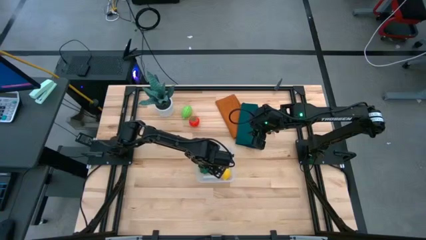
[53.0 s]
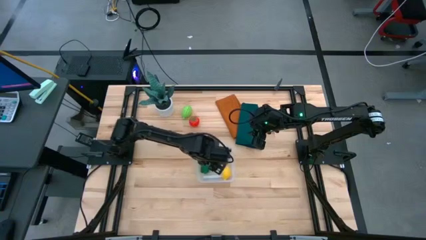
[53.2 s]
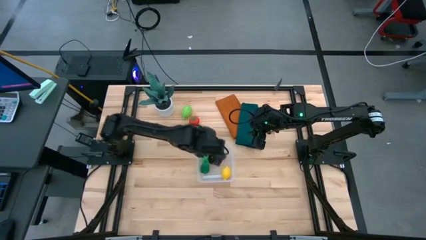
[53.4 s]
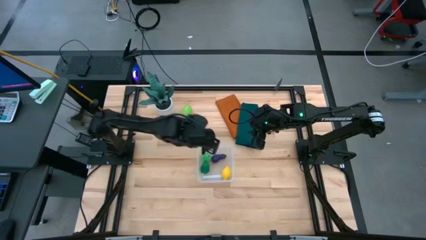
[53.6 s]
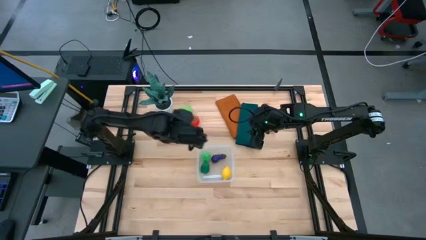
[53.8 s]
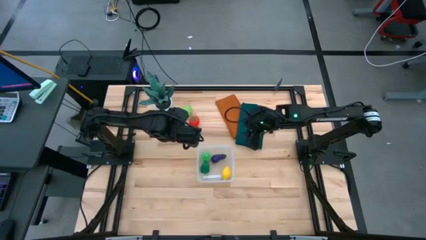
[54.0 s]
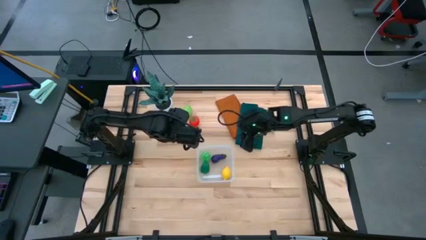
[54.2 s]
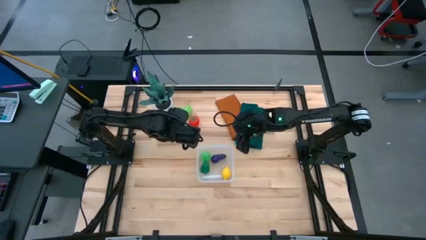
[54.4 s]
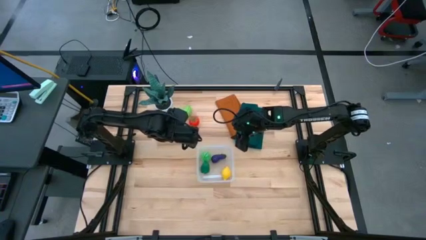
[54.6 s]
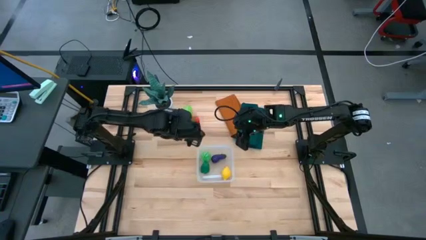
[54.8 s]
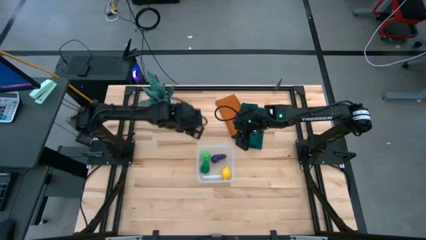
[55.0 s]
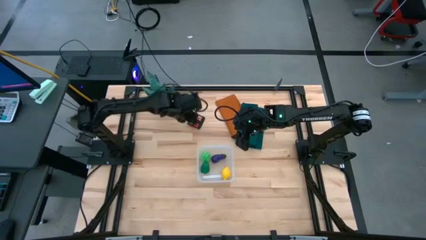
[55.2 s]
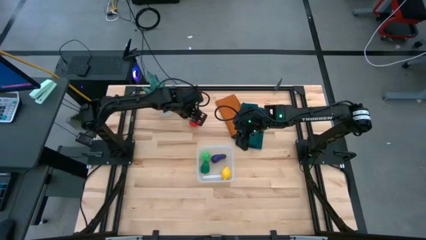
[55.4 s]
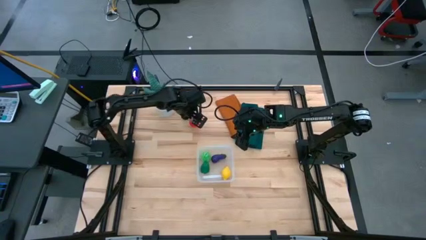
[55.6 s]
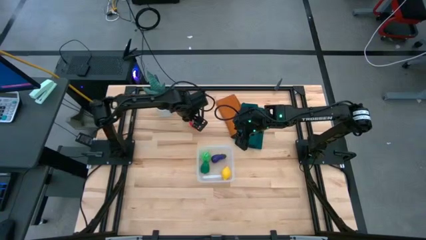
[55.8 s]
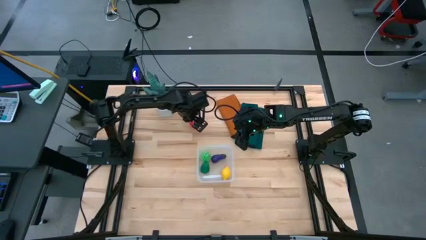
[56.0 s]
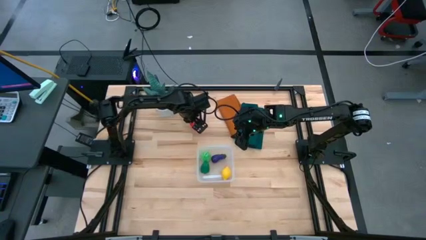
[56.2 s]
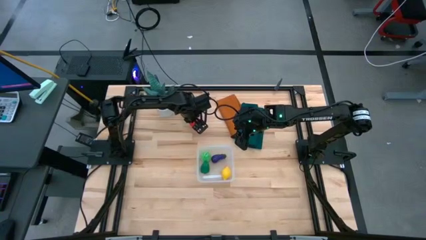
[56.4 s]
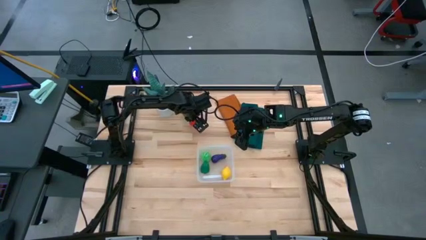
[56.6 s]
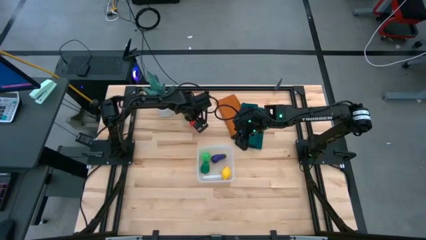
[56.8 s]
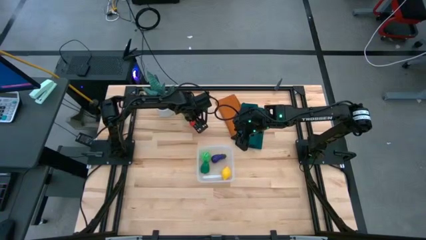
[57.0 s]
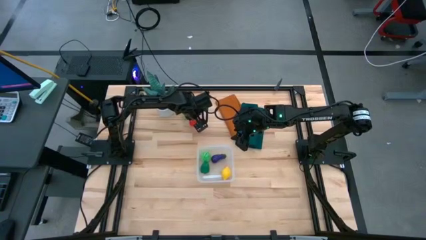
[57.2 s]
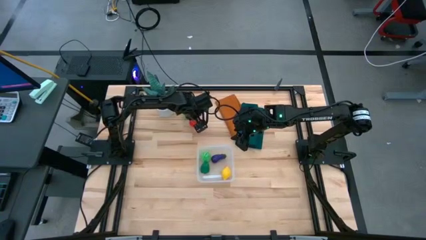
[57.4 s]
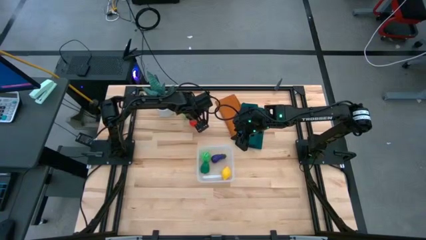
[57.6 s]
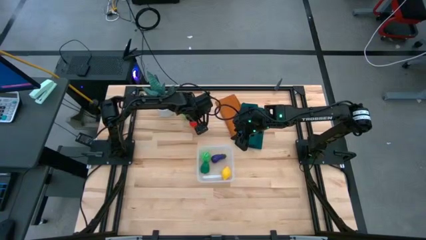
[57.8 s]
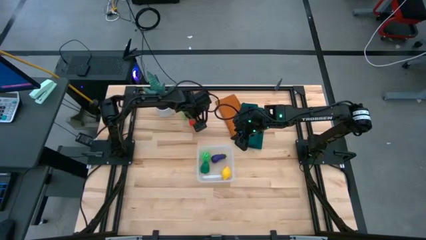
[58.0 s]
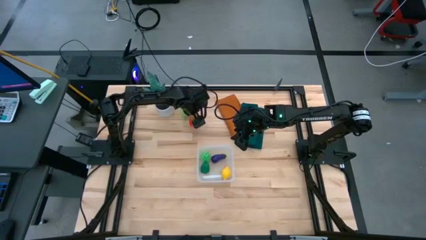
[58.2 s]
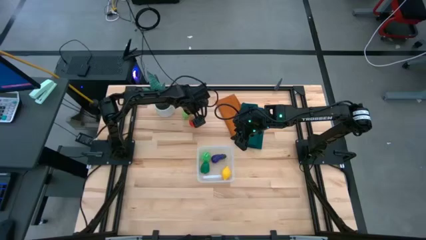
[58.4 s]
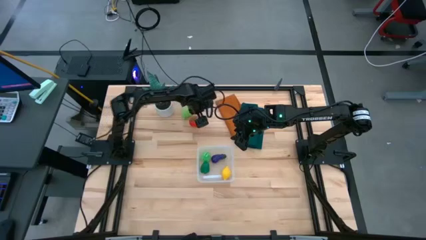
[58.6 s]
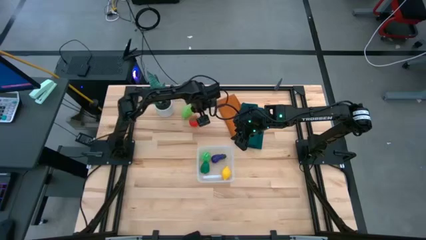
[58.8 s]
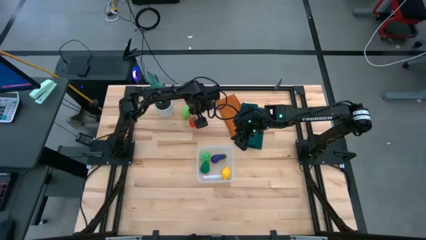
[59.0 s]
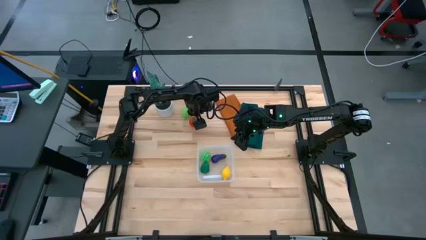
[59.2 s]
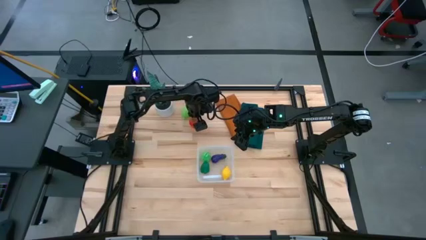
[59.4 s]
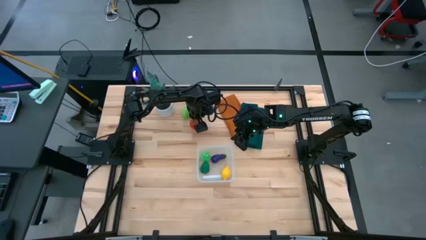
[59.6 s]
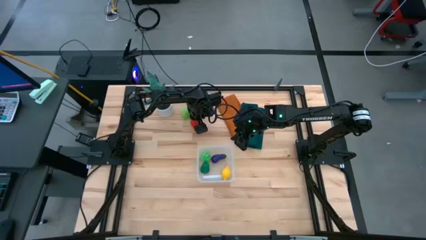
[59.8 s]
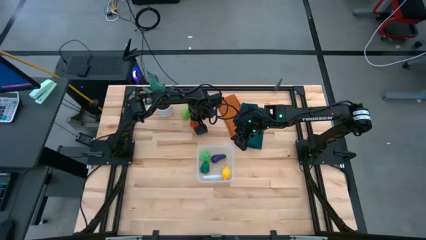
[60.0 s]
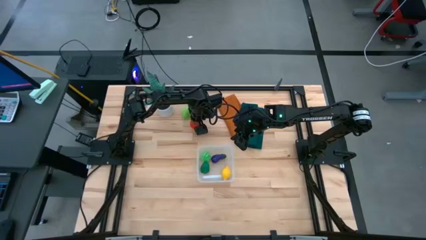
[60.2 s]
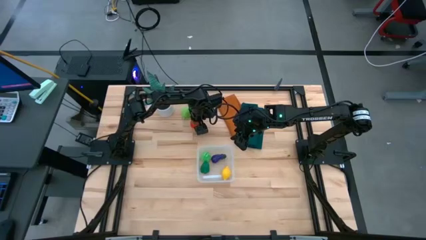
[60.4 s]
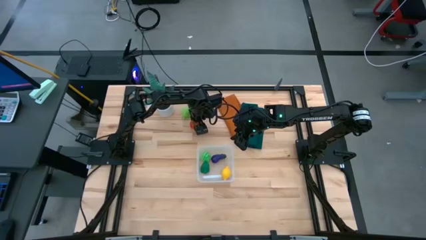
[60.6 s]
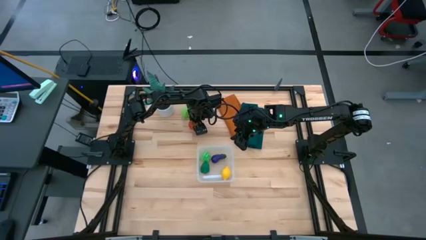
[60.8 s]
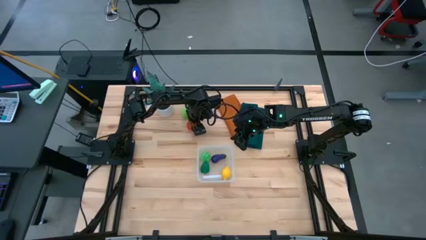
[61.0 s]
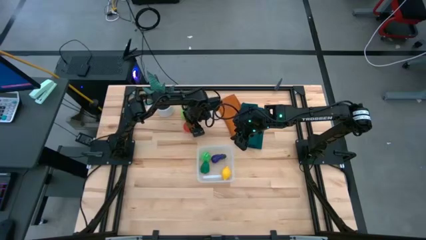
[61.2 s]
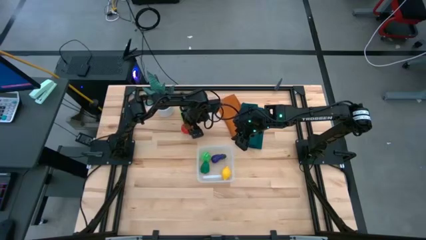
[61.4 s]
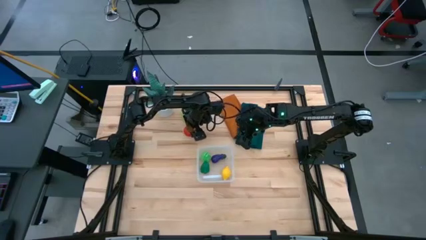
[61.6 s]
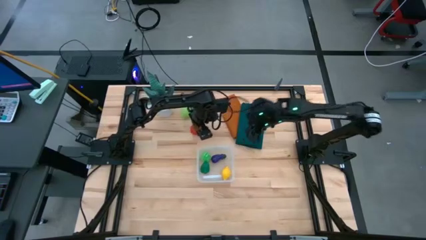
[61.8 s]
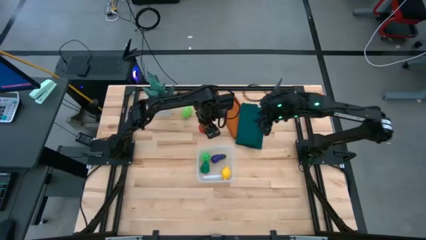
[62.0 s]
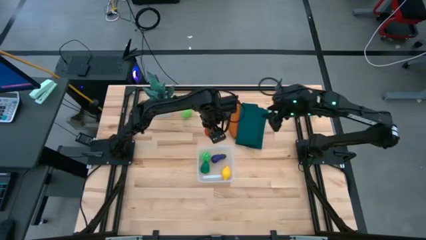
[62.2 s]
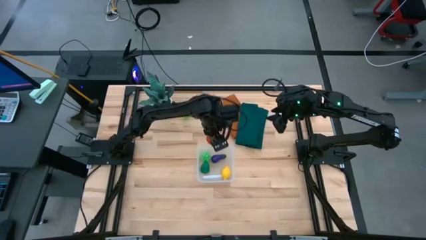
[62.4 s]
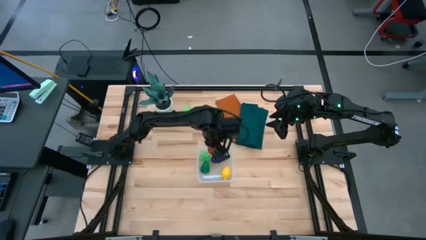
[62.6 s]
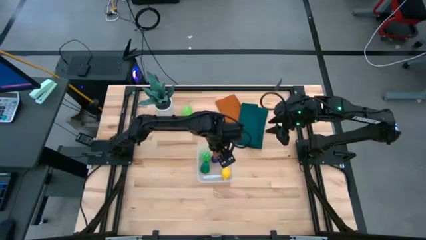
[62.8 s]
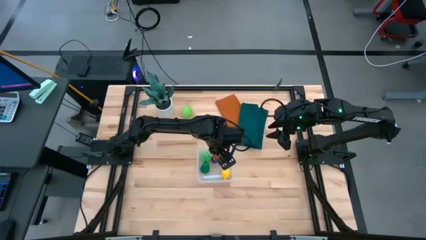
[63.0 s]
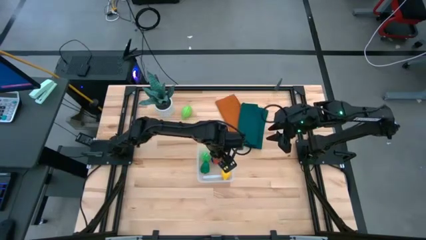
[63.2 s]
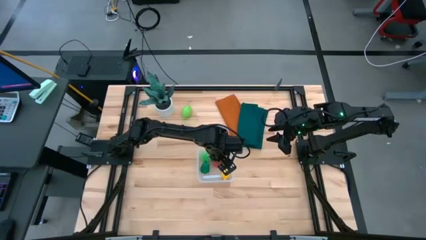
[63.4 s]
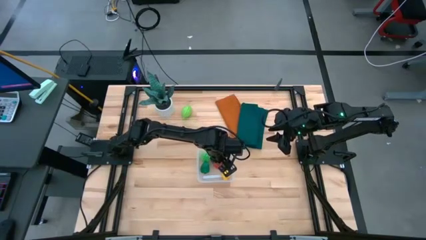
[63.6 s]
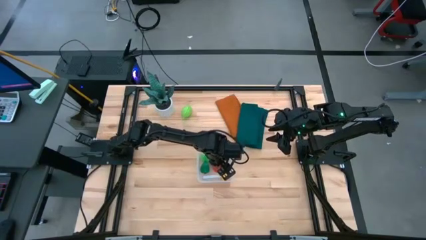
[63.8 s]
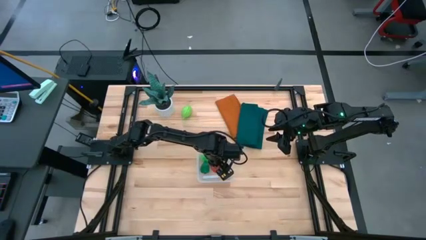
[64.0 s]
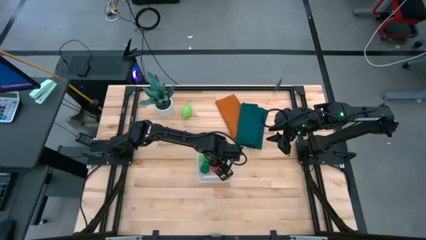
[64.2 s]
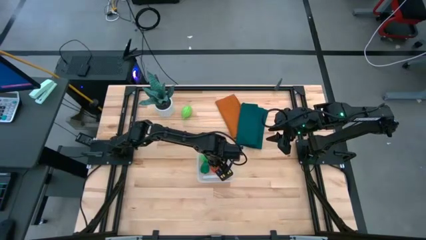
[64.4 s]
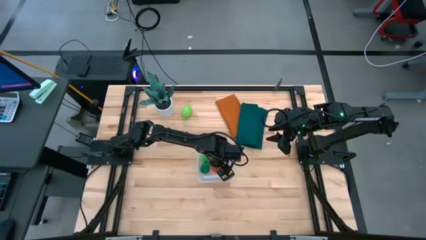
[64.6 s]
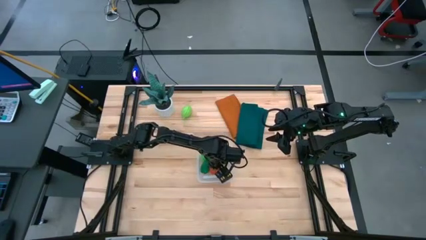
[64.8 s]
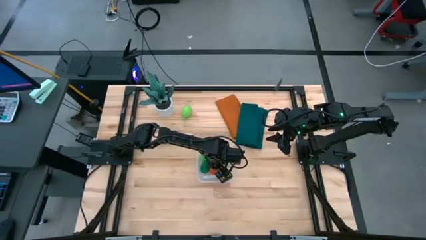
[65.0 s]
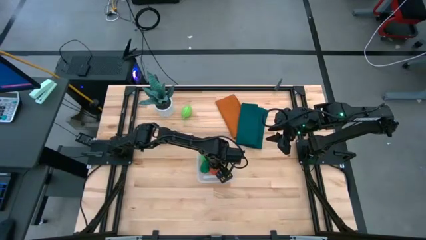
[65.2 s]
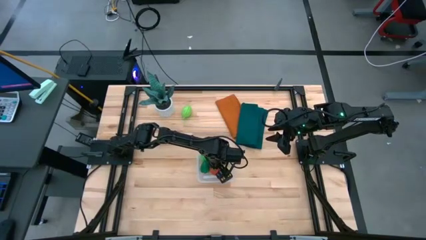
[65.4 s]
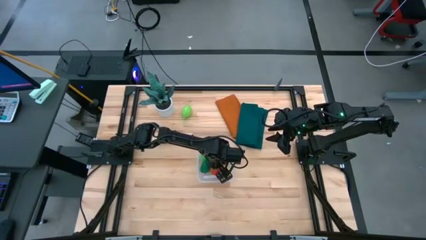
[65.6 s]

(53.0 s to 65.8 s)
Task: Pick and placing Produce into tupperware
Put the red tomato into the transparent container

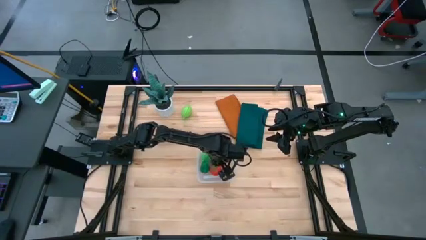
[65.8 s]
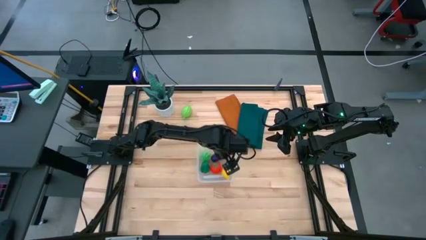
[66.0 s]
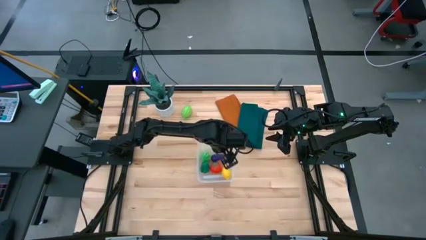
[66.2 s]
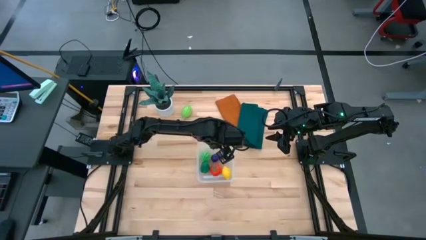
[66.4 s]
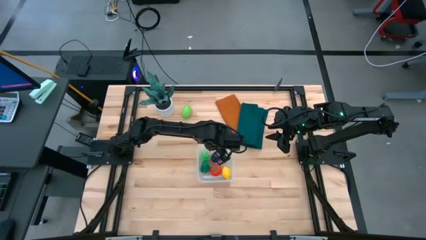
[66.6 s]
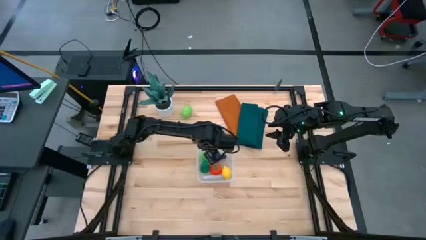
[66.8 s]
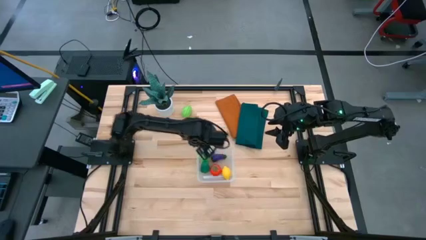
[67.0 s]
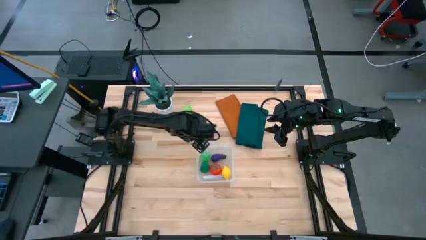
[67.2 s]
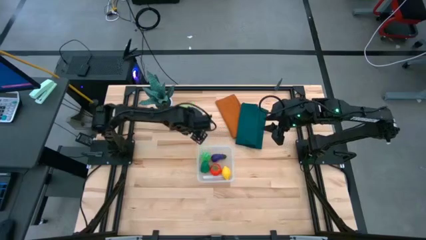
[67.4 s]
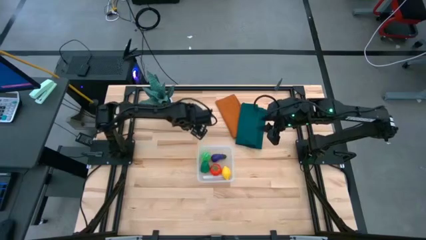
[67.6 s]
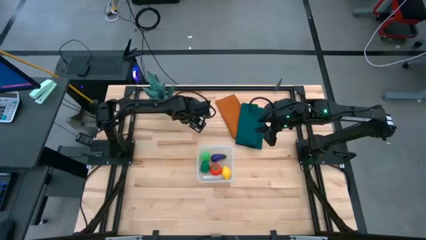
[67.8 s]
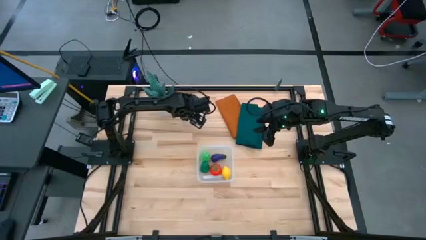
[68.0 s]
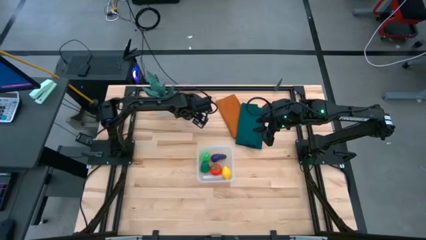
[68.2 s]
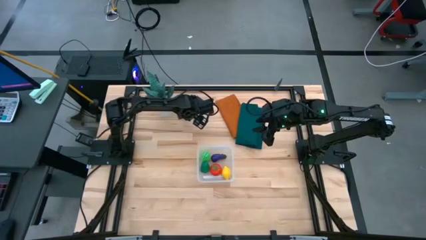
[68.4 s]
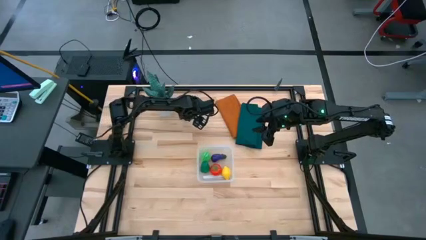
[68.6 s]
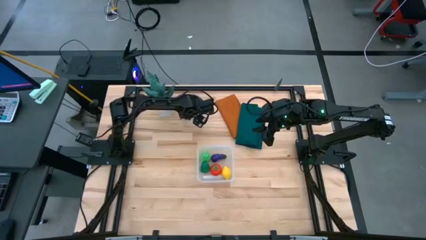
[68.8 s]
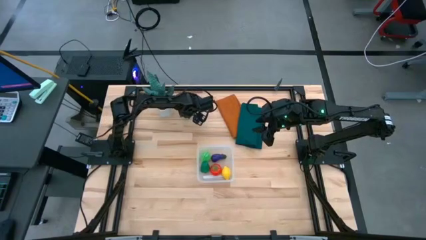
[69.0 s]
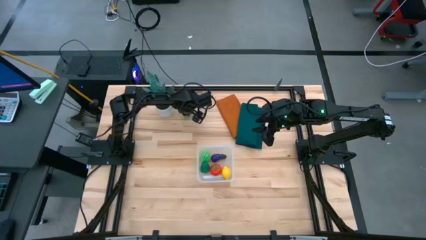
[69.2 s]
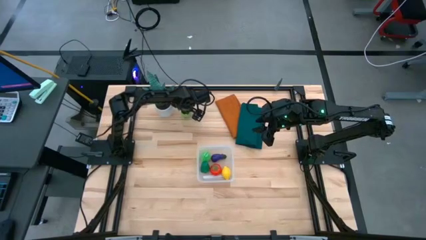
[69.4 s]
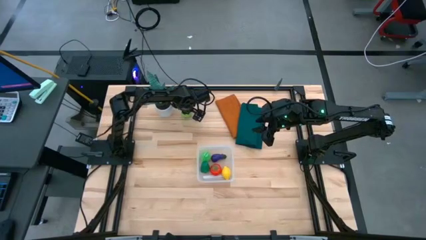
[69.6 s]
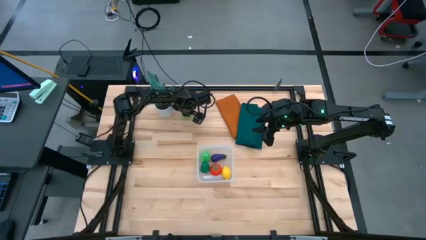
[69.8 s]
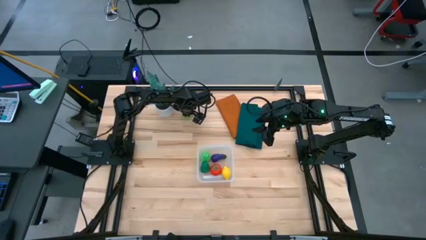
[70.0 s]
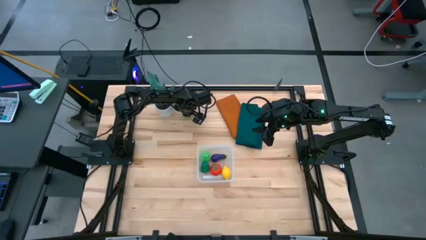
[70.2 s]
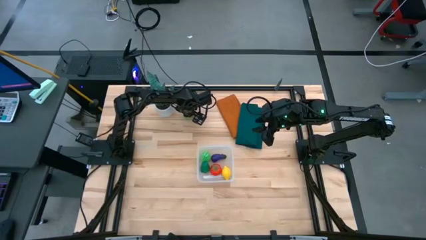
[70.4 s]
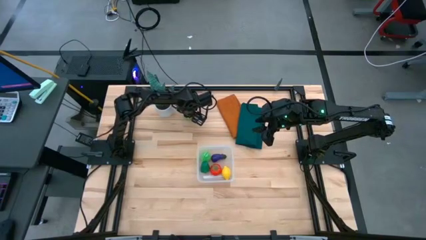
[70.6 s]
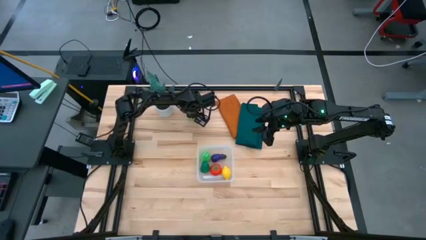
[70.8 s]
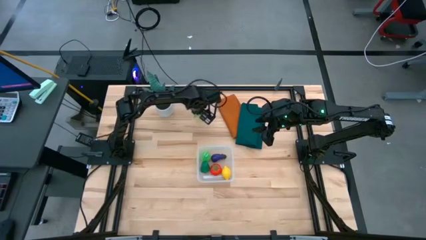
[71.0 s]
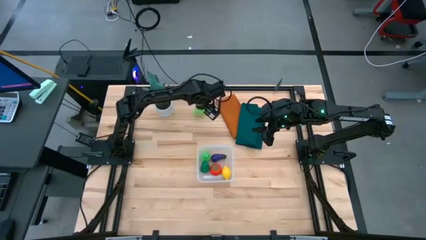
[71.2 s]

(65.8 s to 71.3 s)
Put the green honeydew melon into the transparent container
